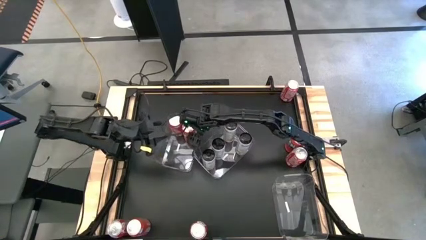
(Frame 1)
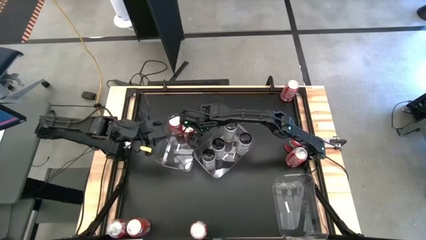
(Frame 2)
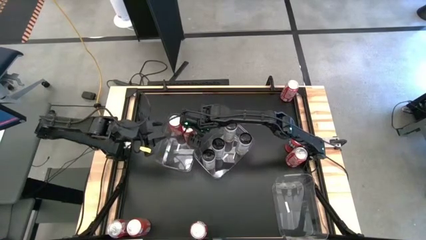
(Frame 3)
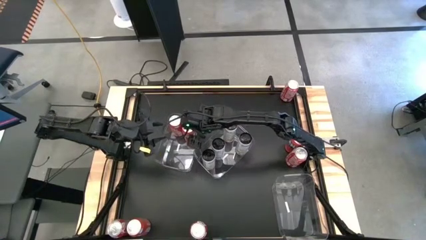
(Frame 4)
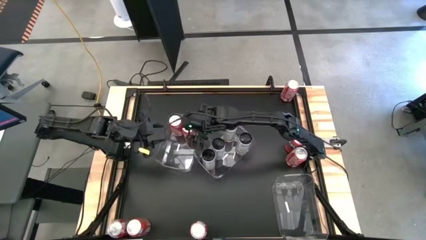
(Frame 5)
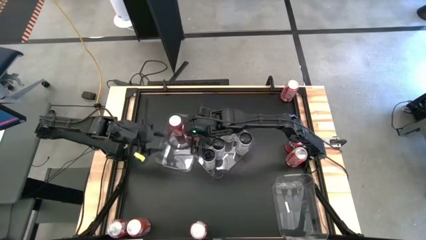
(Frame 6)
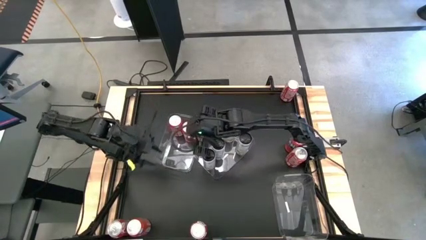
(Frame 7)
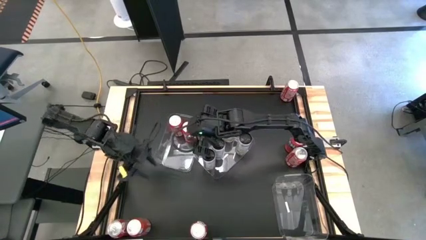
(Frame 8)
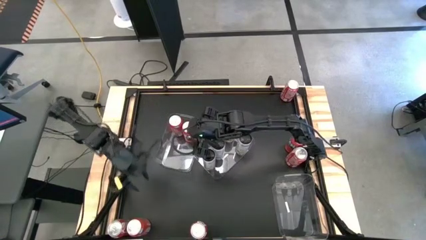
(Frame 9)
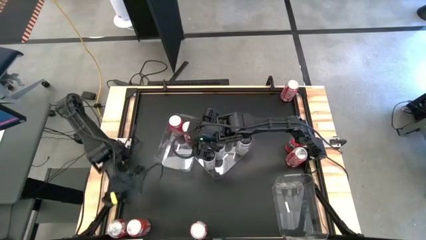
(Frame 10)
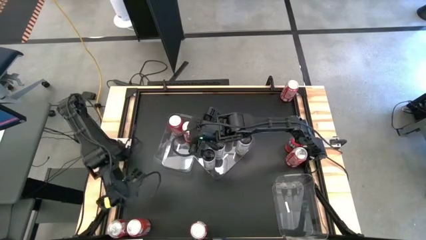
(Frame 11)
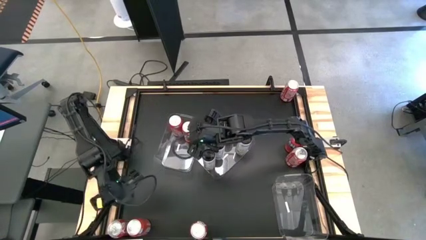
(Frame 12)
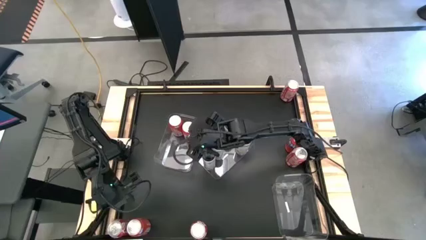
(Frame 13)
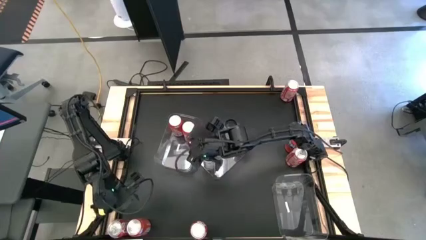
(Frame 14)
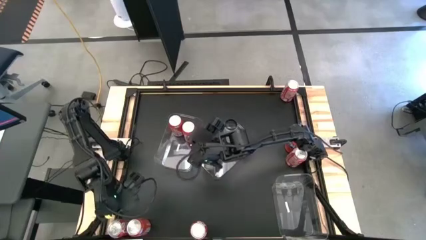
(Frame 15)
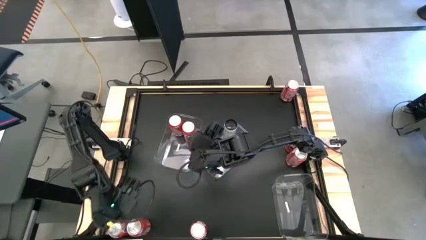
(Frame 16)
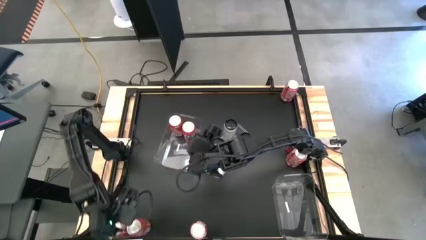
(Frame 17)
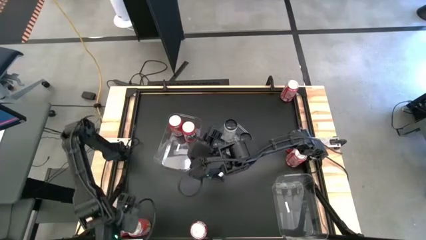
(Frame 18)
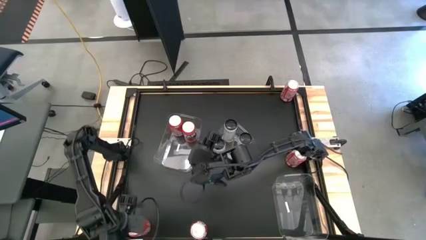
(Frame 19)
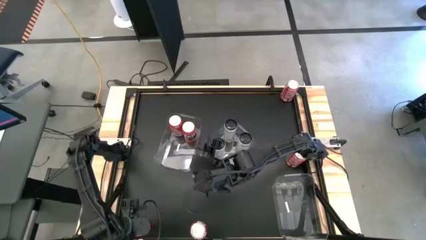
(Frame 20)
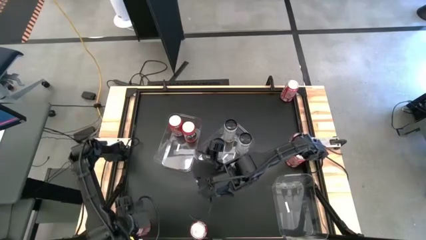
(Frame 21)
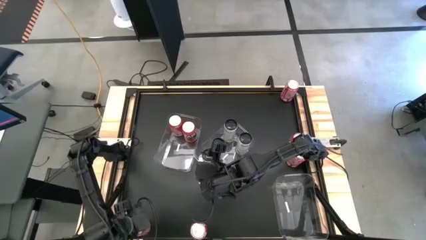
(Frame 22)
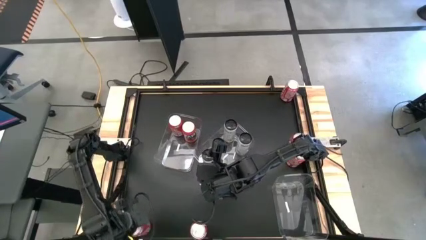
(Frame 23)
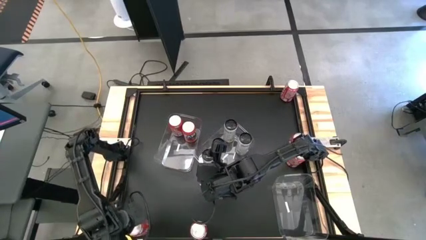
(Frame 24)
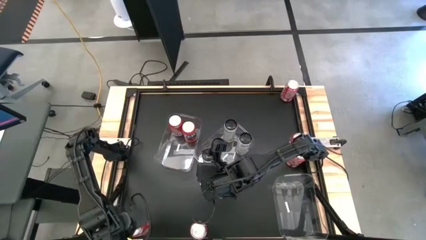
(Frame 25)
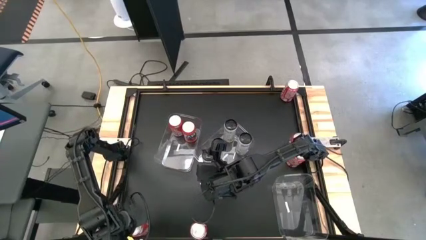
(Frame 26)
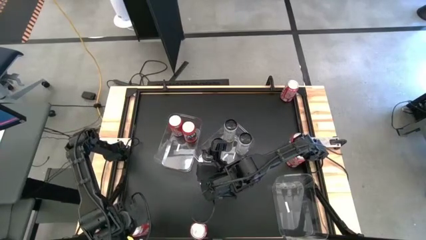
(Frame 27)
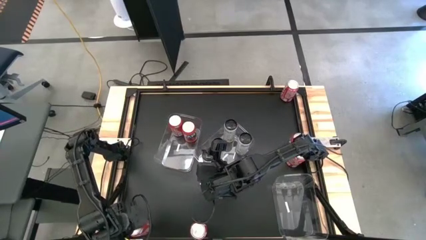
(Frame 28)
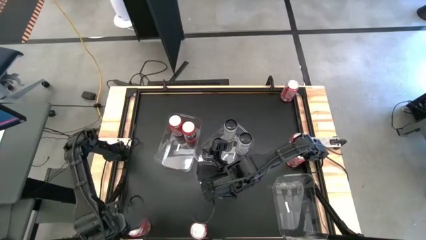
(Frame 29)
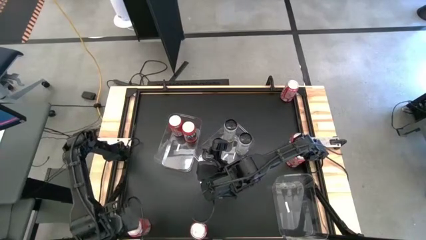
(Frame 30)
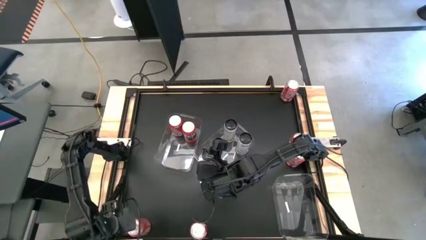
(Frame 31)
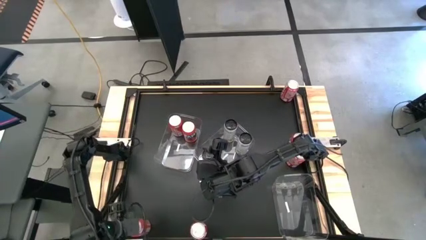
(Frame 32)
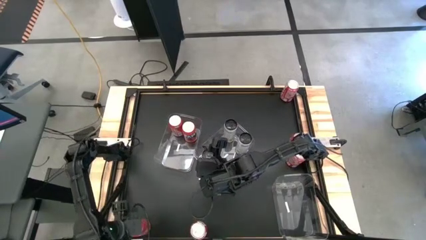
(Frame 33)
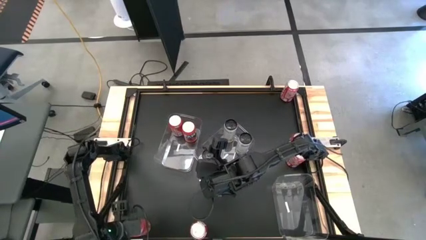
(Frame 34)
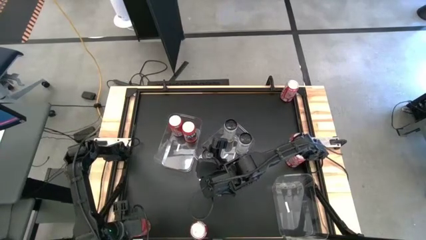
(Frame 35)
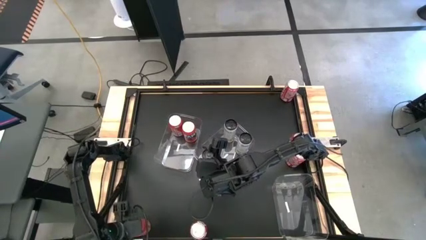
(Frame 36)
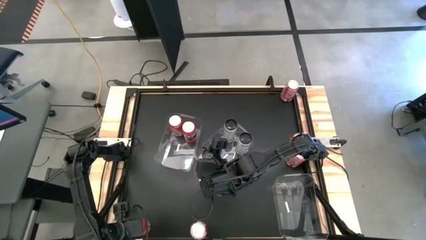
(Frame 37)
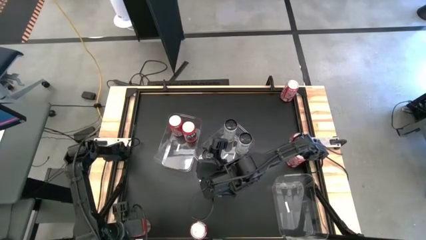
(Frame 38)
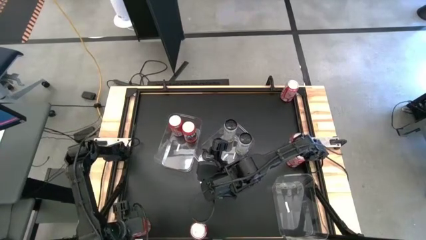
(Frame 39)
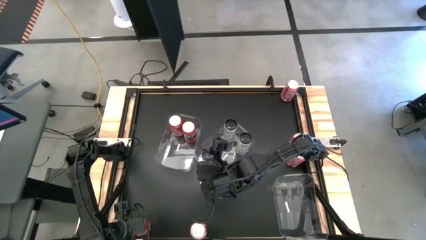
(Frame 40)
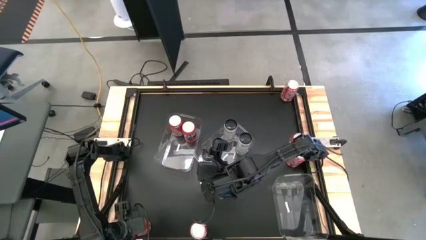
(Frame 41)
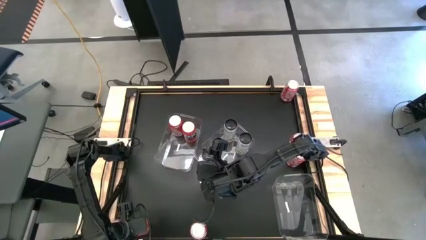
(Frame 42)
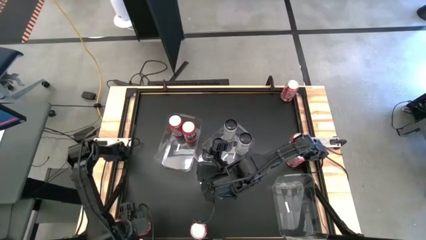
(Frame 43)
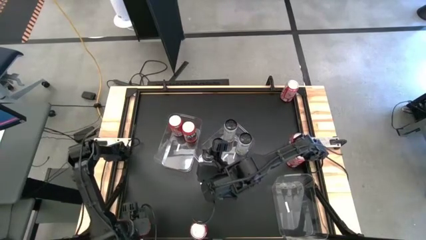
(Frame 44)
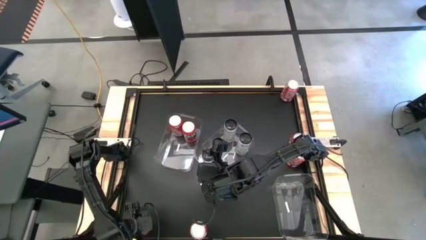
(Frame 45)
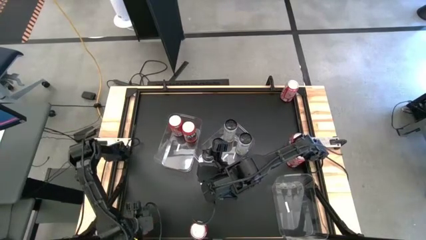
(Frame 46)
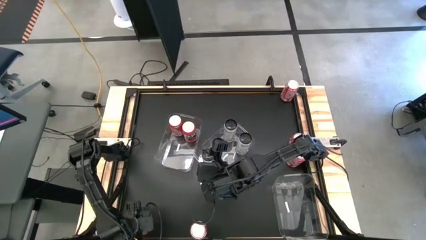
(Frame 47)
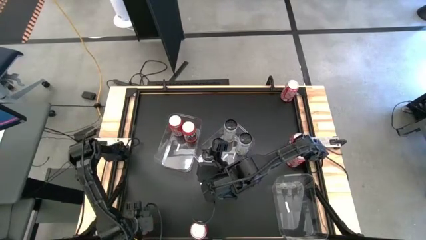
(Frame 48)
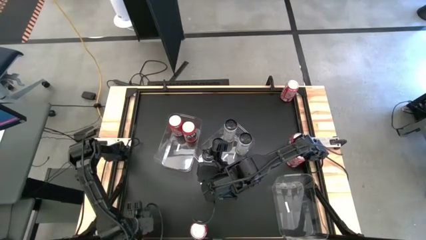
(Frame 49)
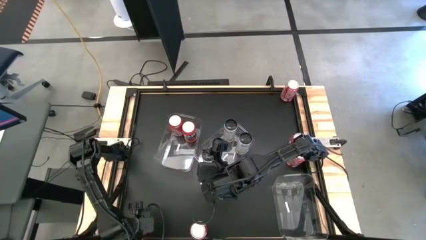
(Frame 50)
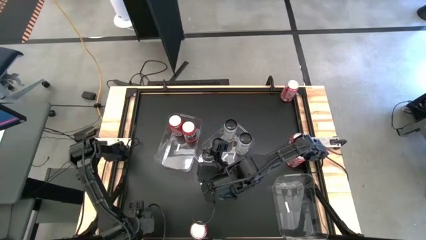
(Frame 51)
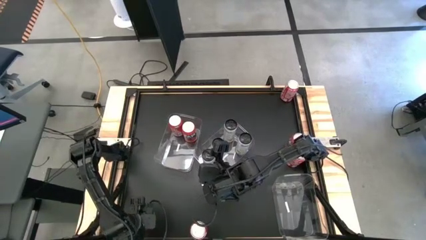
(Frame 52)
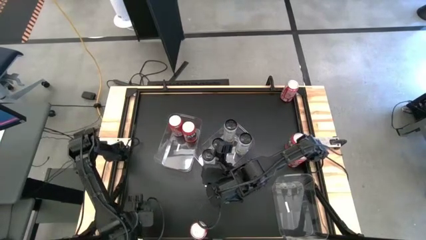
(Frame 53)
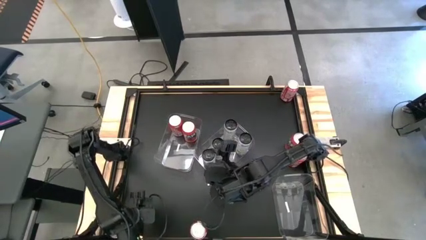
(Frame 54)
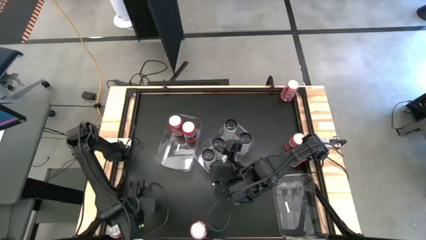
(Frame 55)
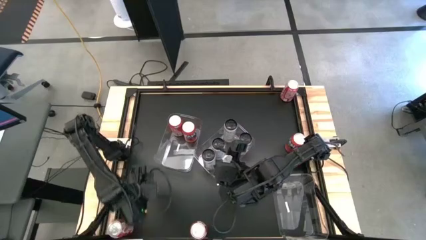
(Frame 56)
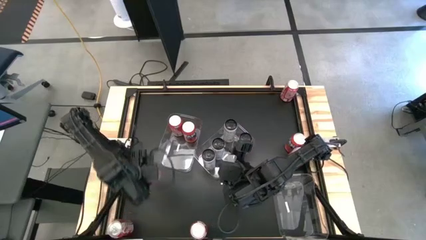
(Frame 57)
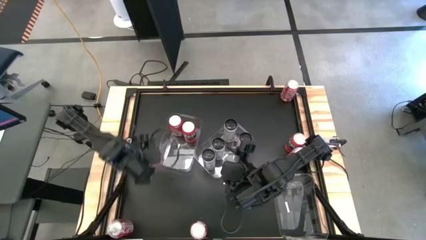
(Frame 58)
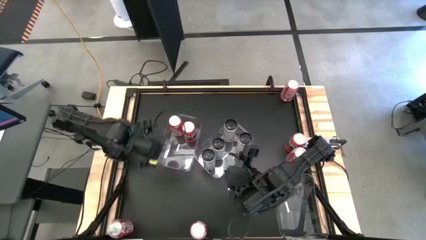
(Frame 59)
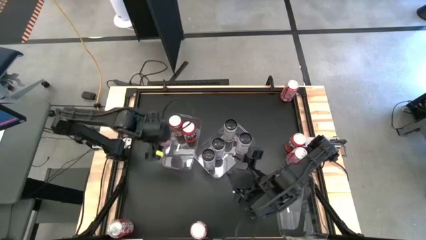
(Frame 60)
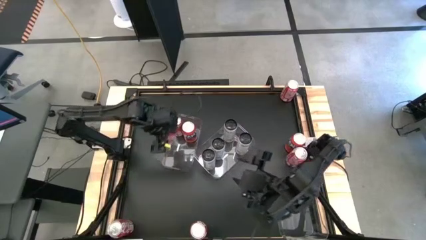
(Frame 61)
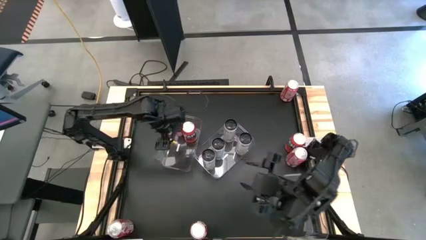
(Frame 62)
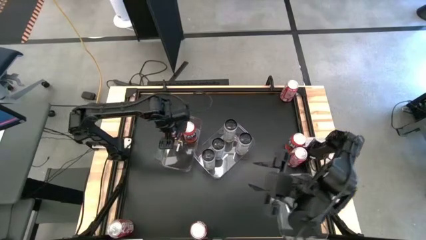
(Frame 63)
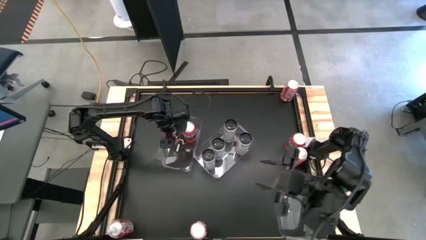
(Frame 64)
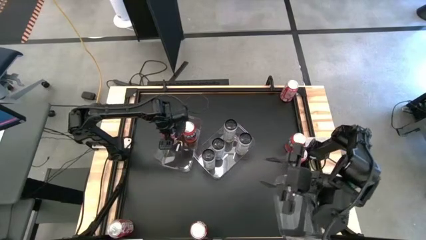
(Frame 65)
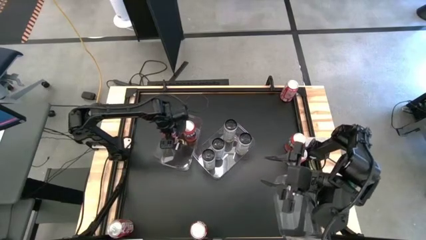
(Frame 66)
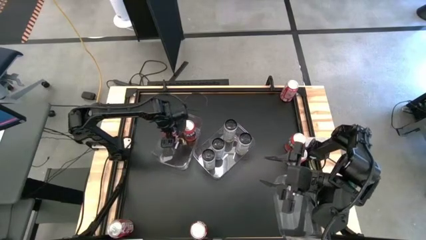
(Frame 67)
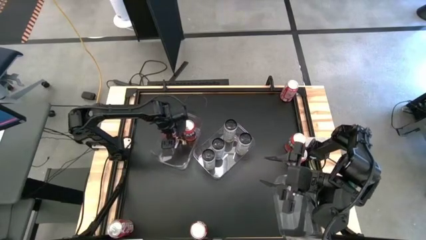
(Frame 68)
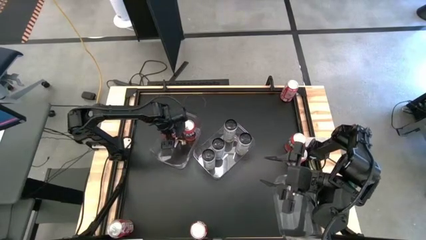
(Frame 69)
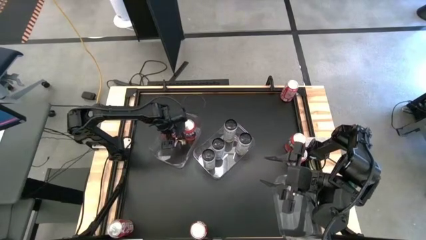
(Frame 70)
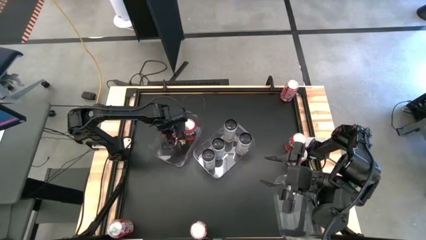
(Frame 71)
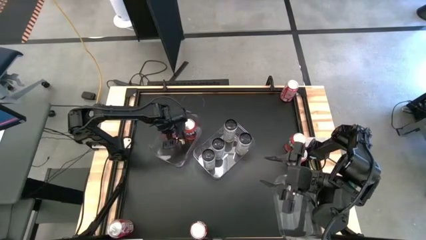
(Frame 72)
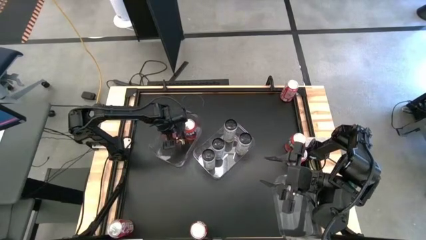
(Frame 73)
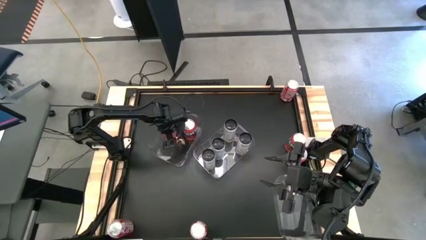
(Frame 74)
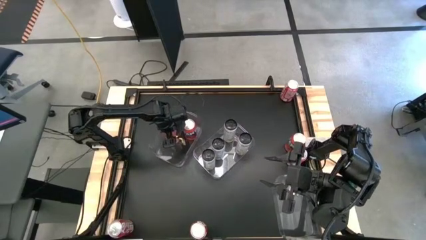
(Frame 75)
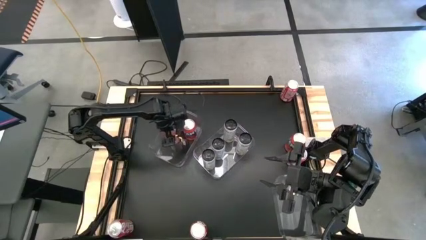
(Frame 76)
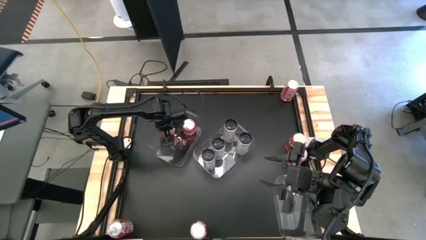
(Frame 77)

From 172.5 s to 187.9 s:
Task: Sort soda cans
Put the orange soda can into the left transparent bin

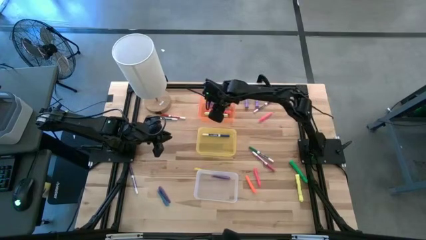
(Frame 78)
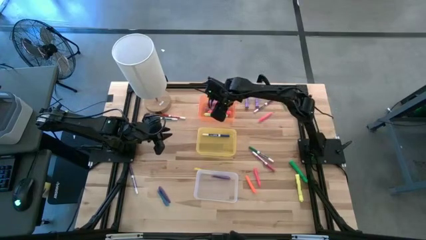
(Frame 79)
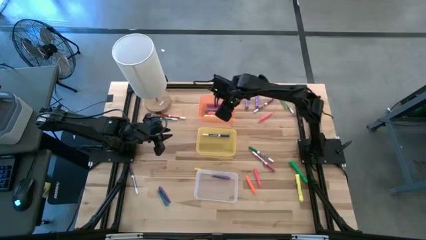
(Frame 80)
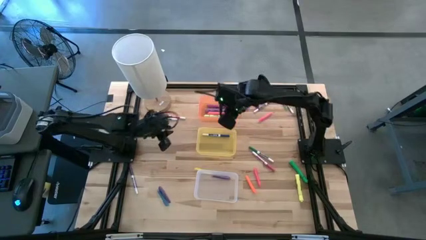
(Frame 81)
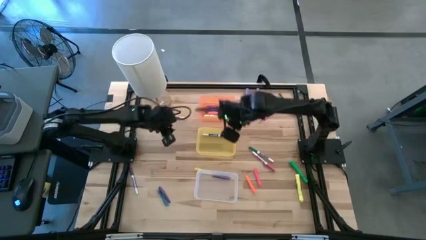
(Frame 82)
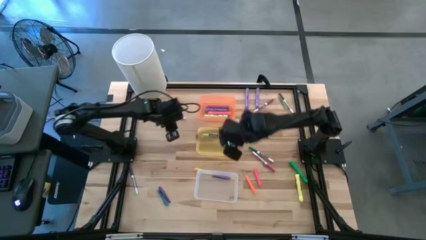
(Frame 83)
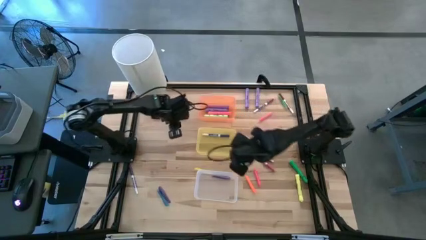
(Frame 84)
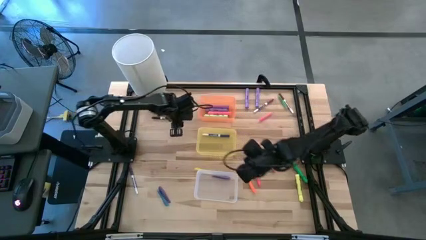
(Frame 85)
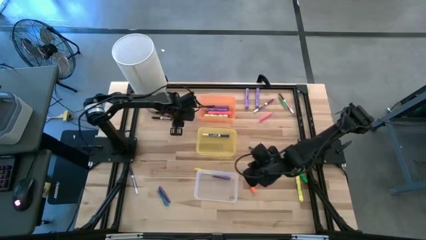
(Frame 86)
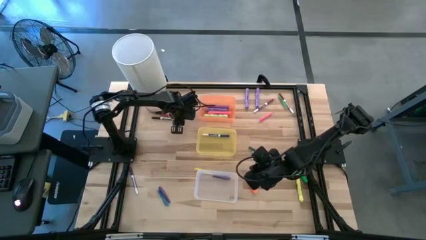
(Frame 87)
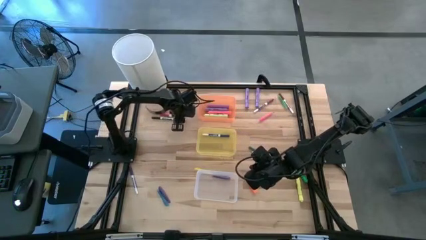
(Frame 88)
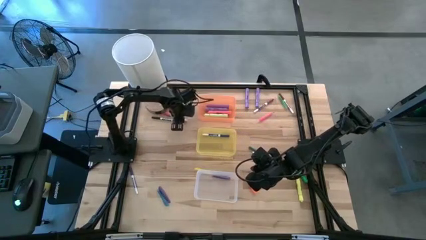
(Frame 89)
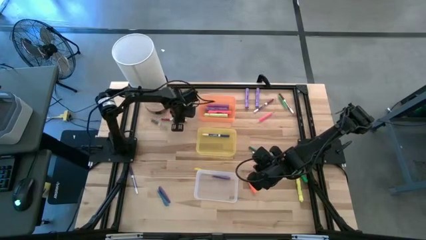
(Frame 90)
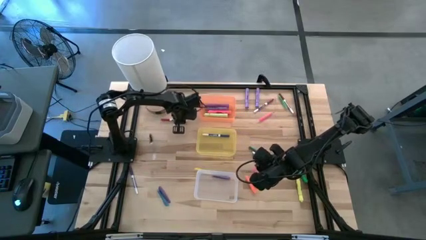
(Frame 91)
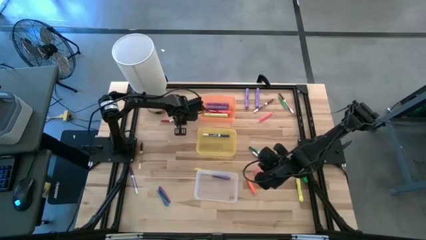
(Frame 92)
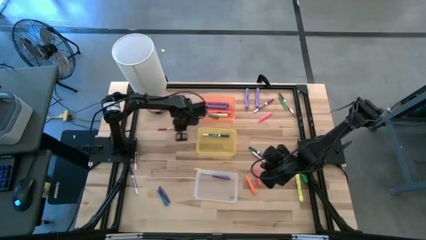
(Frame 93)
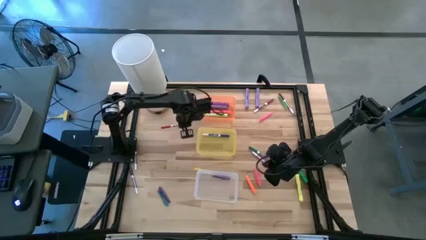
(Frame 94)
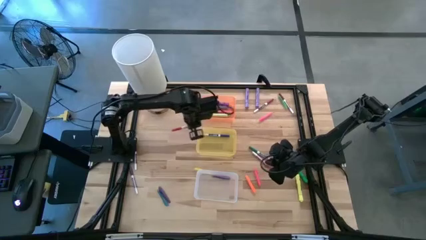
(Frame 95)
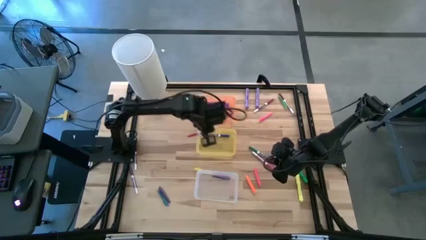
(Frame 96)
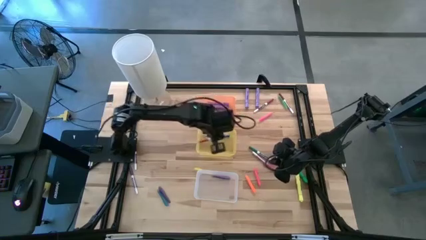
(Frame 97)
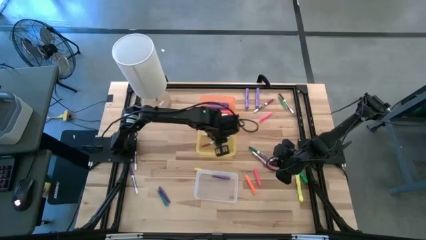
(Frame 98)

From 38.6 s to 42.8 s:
Task: Pick & Place Markers
Put the red marker pen into the yellow bin
